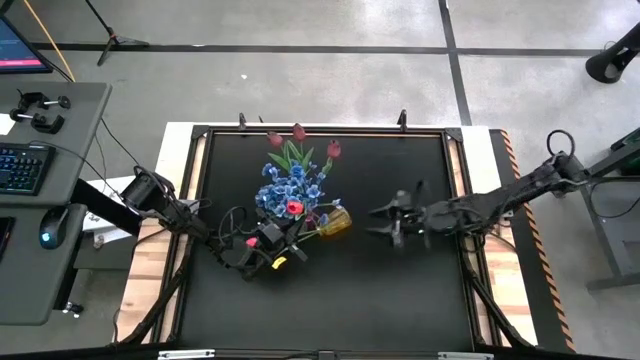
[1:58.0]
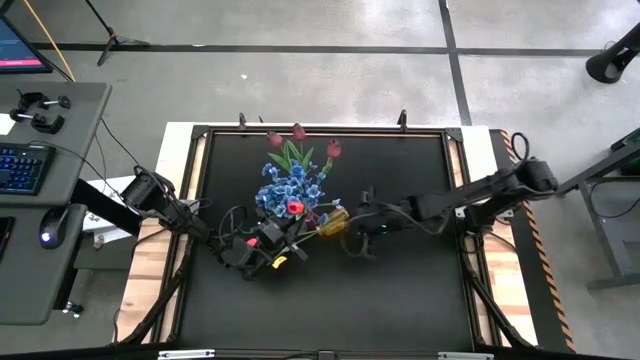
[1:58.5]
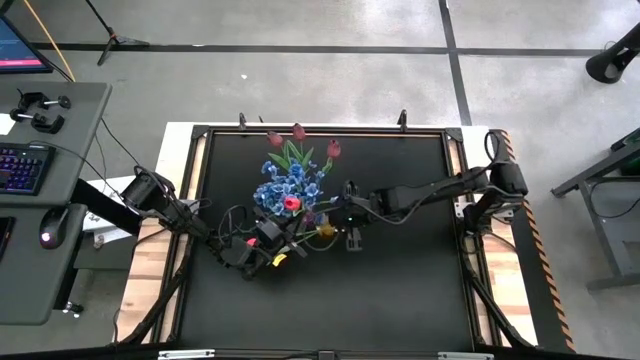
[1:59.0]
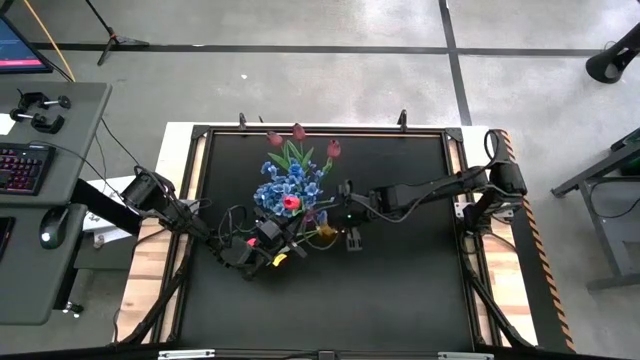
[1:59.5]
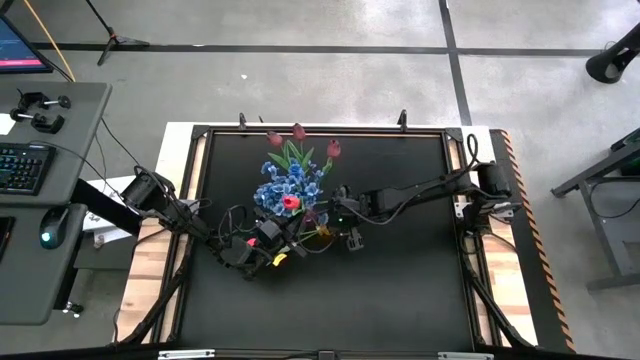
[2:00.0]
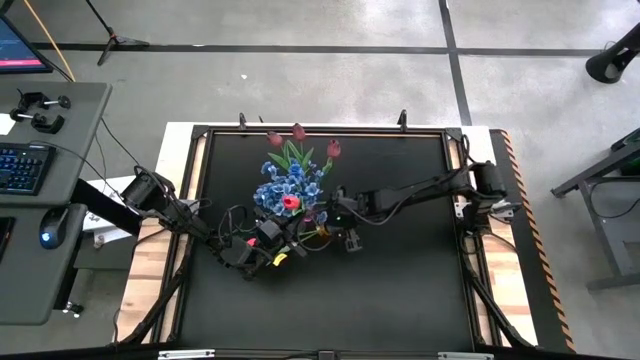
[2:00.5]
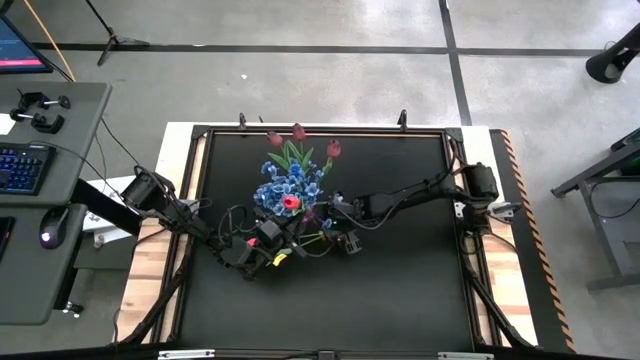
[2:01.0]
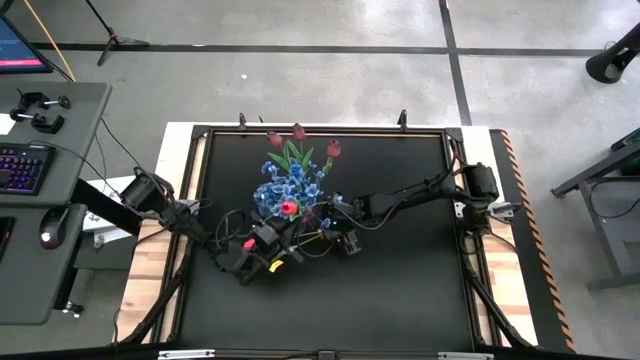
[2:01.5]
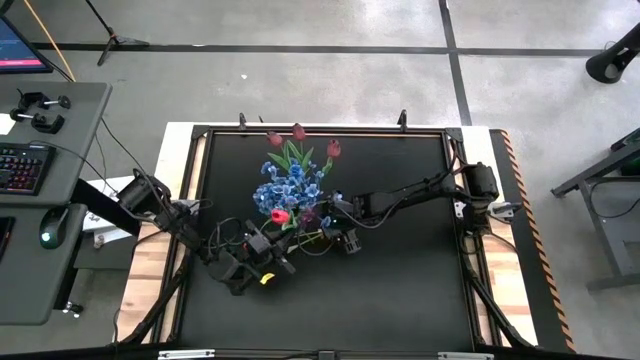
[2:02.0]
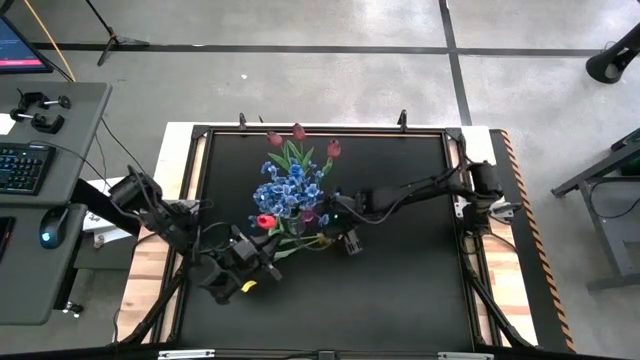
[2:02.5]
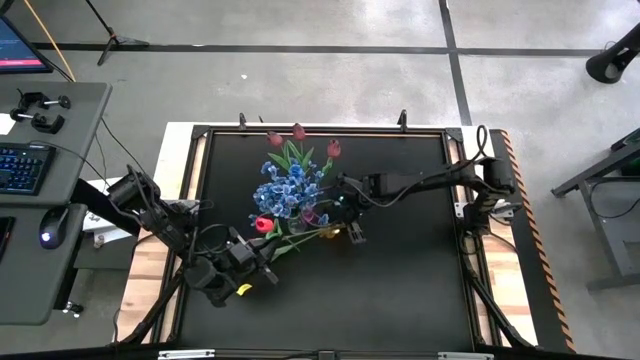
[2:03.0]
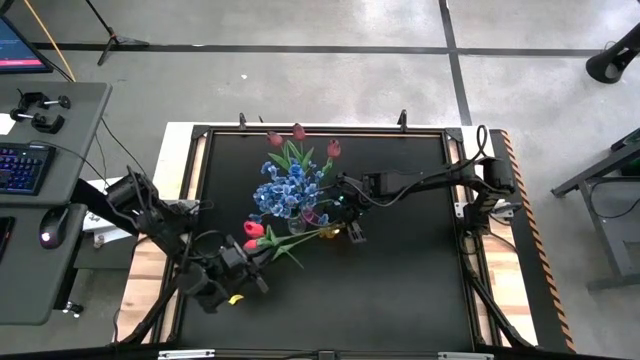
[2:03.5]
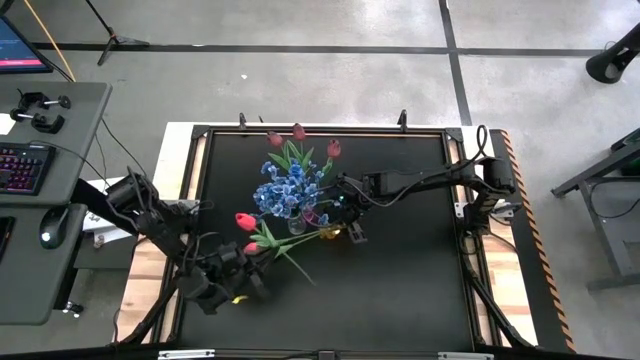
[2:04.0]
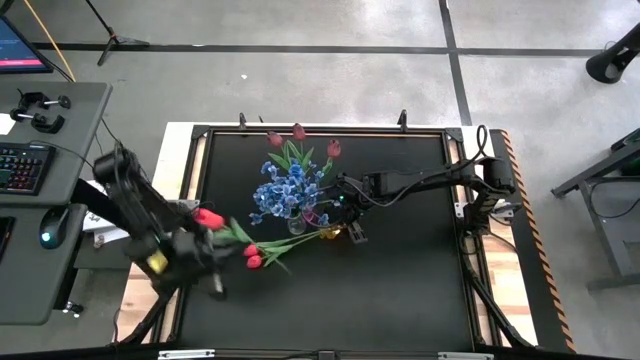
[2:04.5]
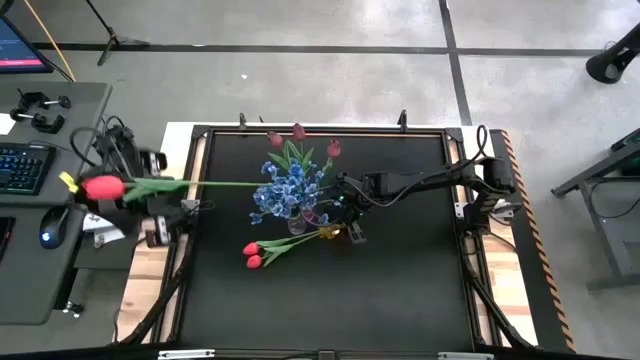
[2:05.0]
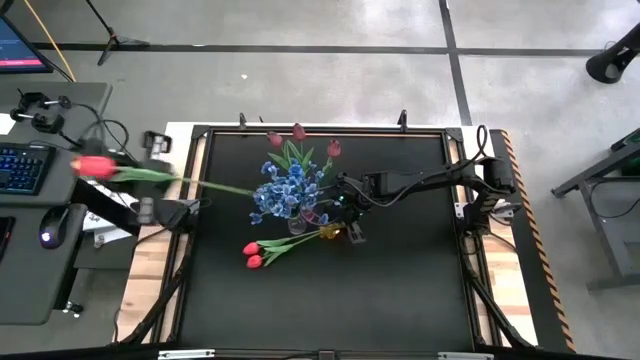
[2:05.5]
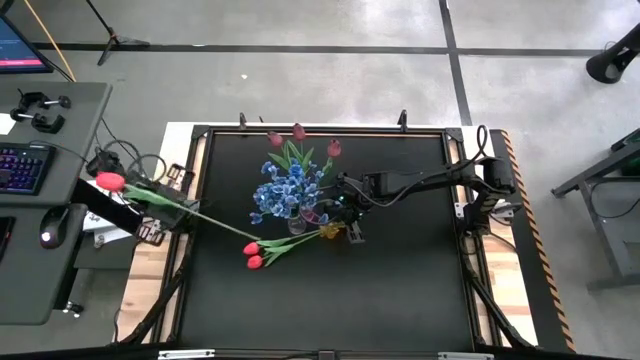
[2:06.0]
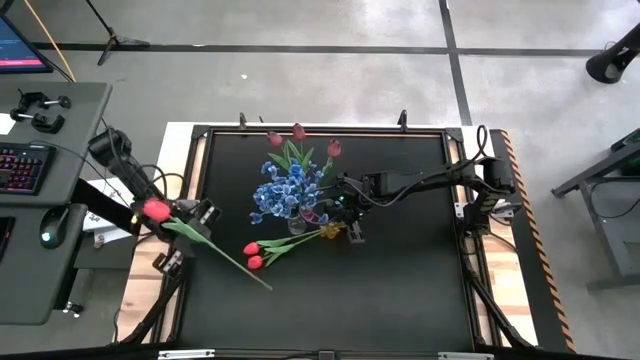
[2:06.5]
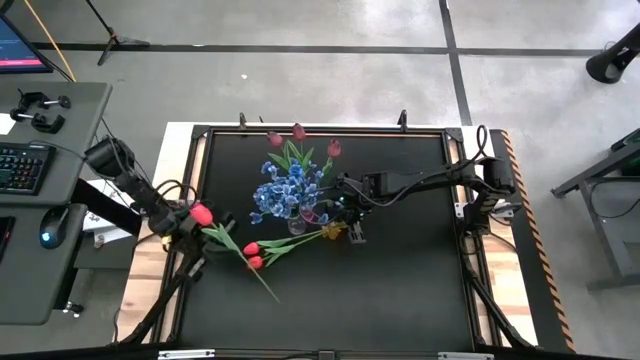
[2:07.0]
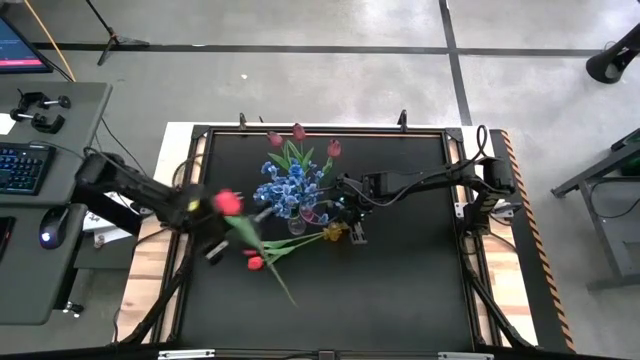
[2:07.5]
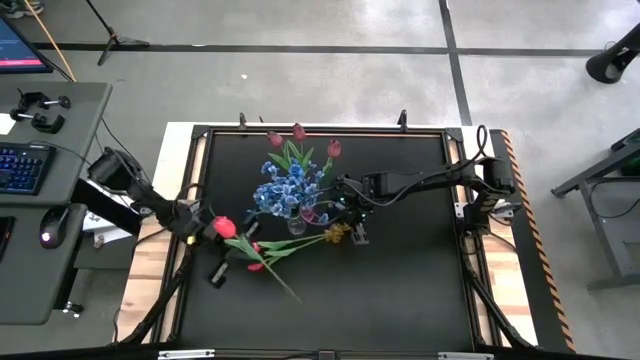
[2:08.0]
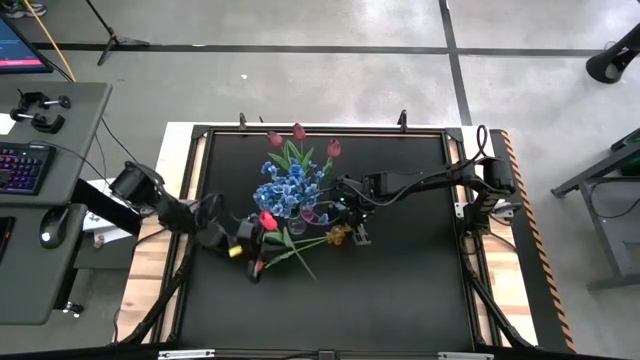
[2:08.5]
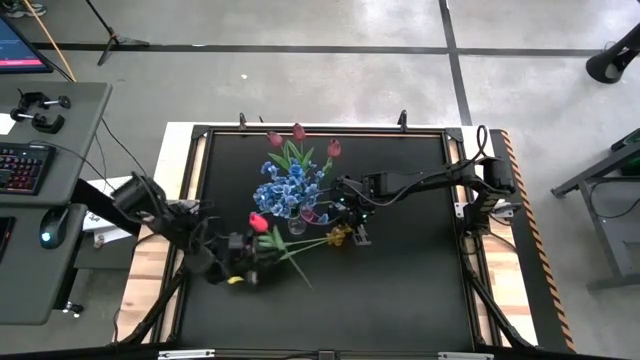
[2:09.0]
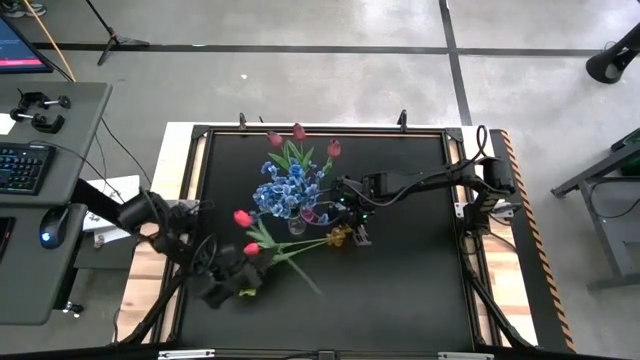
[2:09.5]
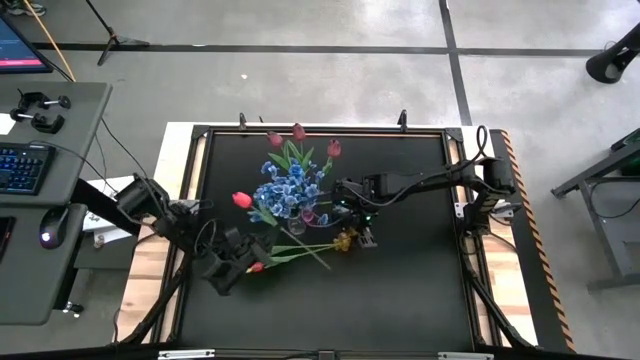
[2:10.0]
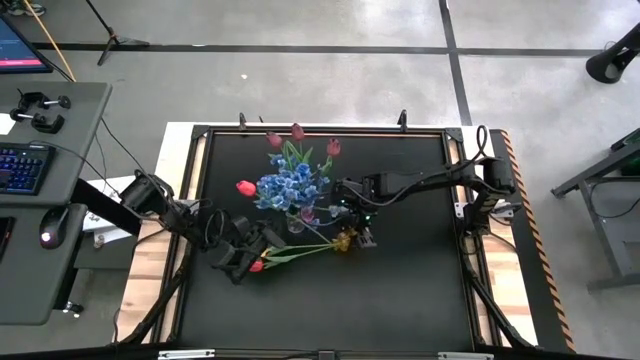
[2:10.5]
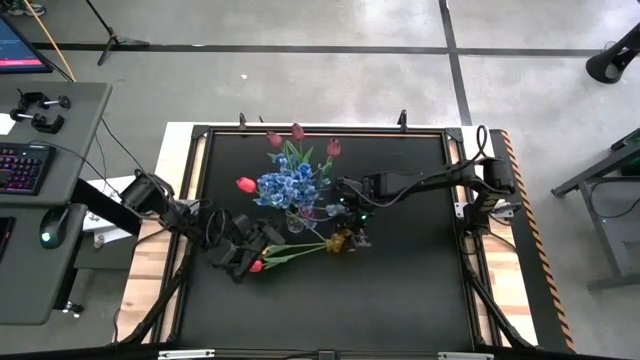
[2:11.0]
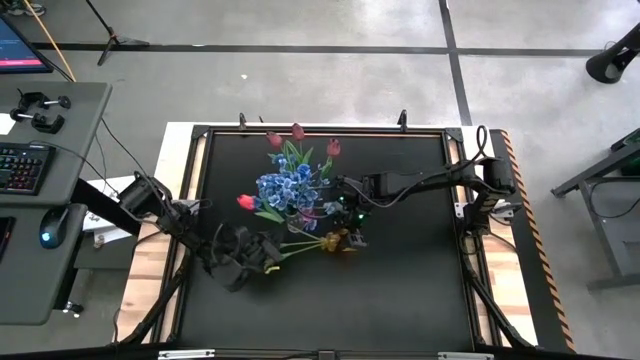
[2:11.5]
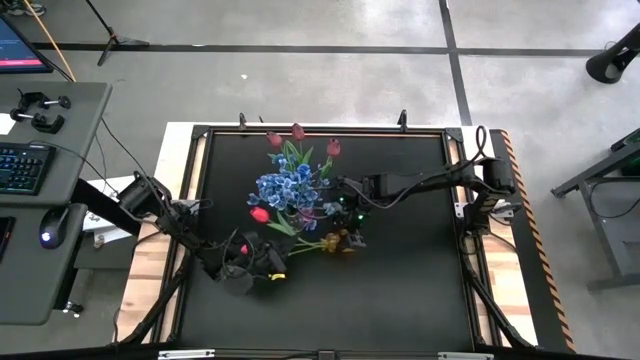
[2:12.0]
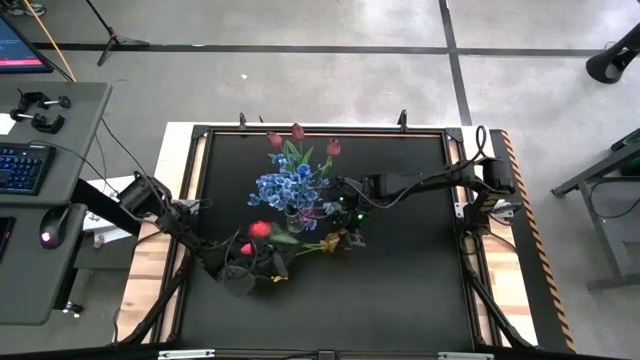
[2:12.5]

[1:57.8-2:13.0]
Task: Sort flowers into vase by color
Put the red flower into the yellow vase
